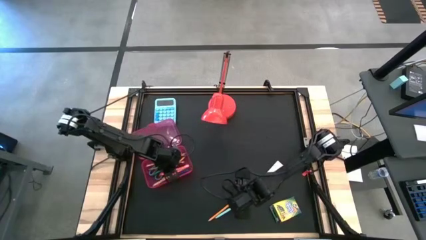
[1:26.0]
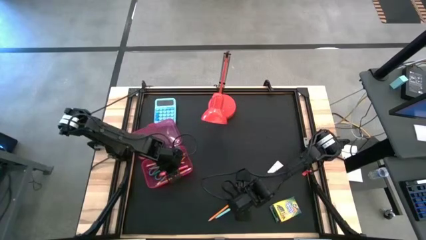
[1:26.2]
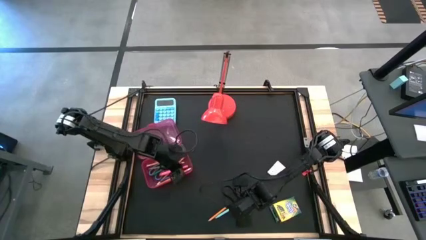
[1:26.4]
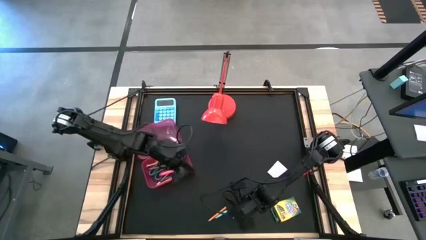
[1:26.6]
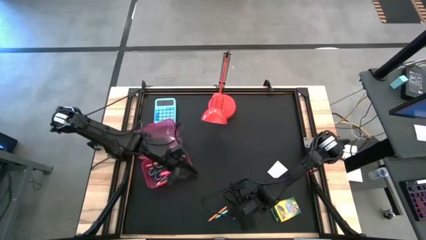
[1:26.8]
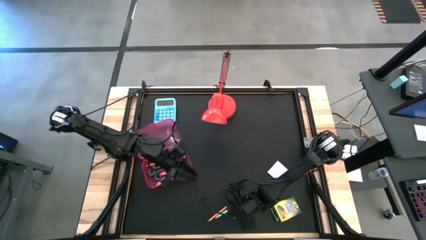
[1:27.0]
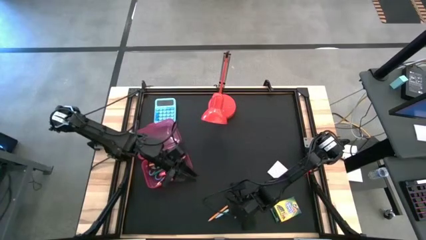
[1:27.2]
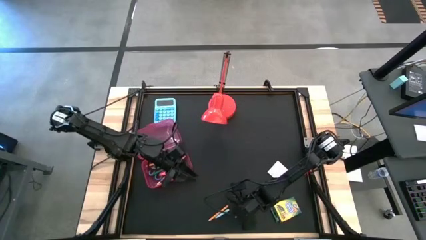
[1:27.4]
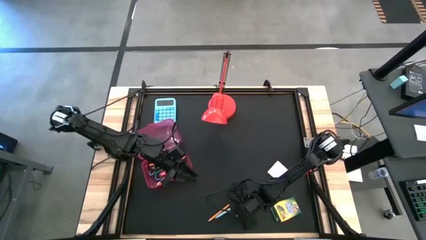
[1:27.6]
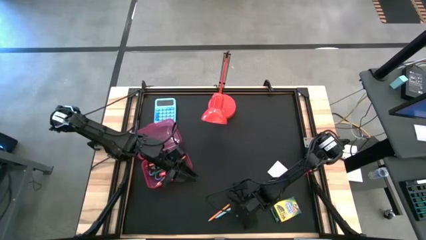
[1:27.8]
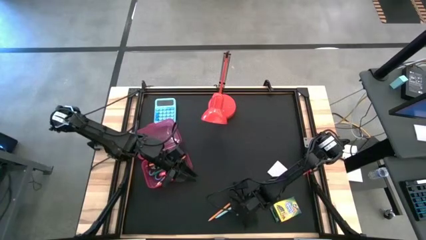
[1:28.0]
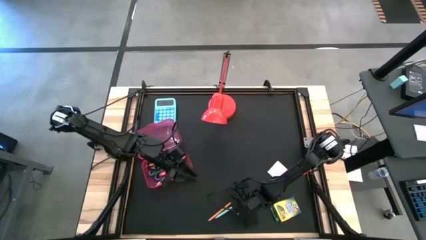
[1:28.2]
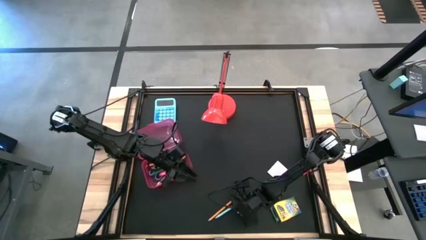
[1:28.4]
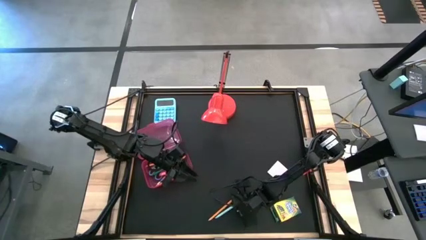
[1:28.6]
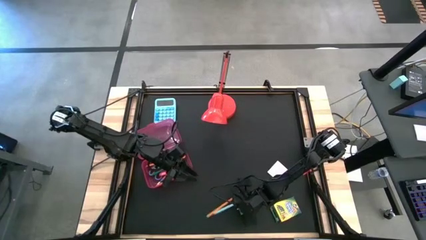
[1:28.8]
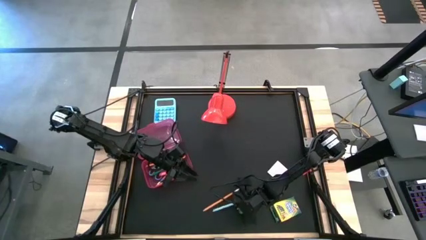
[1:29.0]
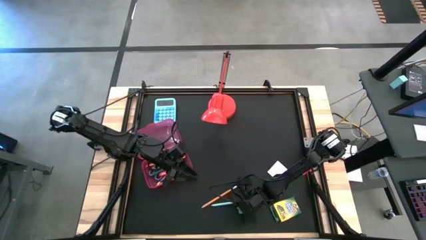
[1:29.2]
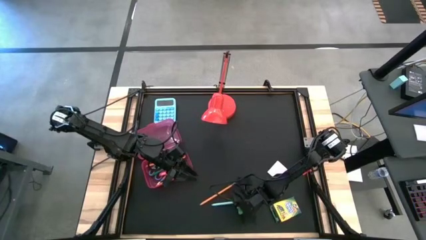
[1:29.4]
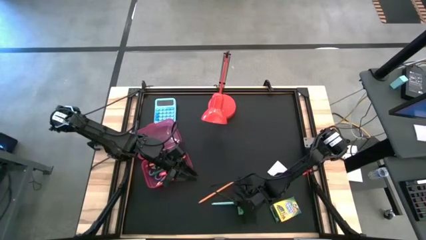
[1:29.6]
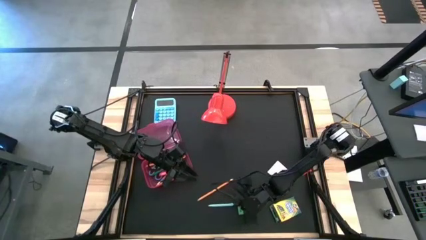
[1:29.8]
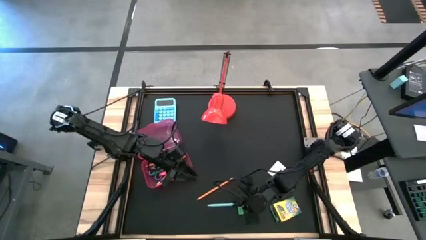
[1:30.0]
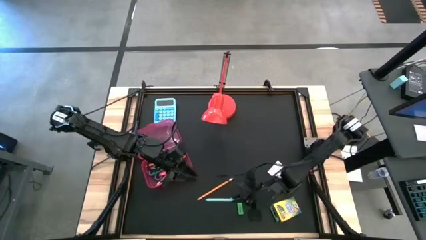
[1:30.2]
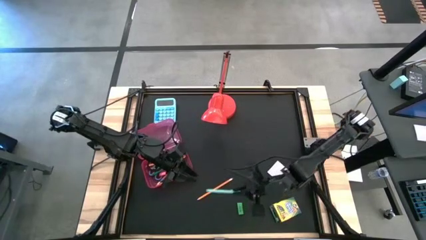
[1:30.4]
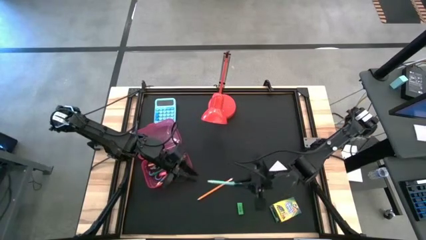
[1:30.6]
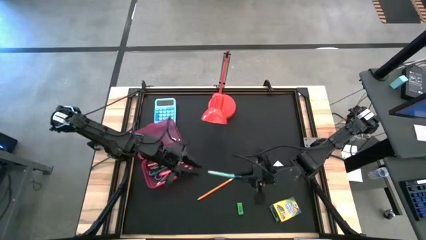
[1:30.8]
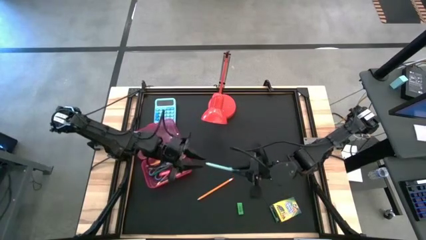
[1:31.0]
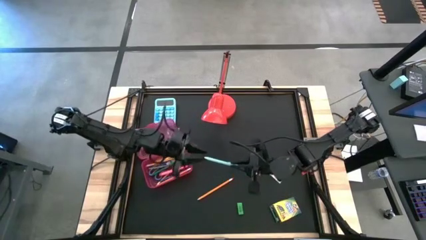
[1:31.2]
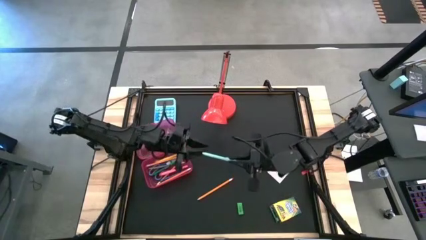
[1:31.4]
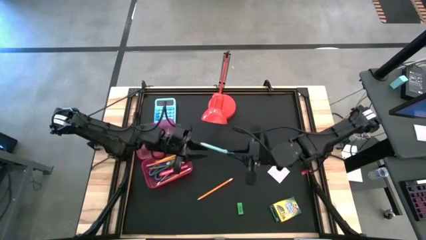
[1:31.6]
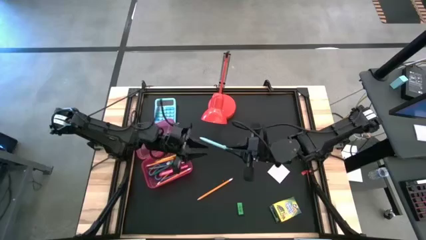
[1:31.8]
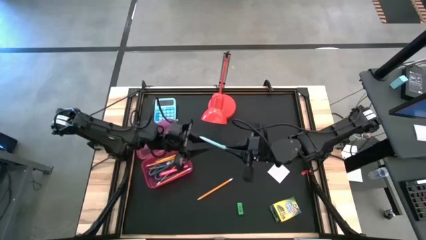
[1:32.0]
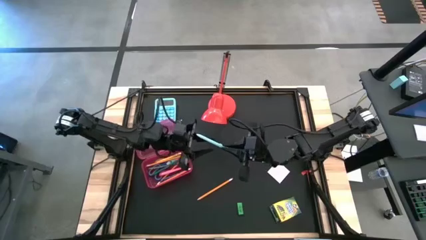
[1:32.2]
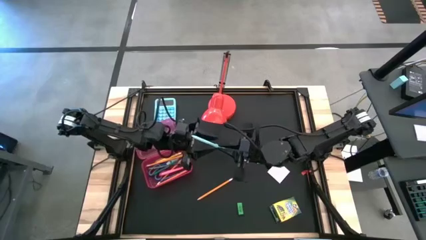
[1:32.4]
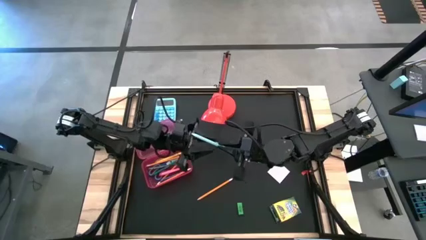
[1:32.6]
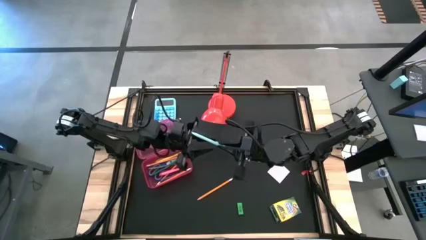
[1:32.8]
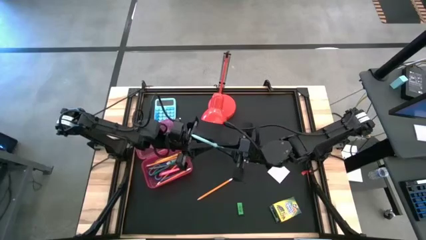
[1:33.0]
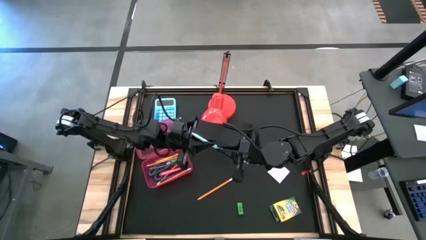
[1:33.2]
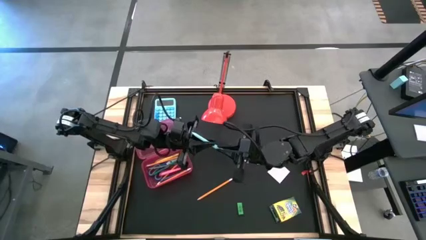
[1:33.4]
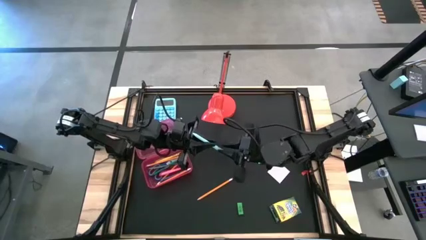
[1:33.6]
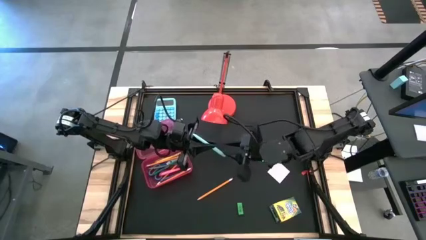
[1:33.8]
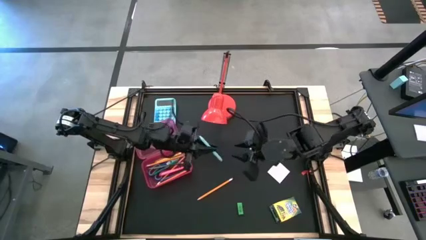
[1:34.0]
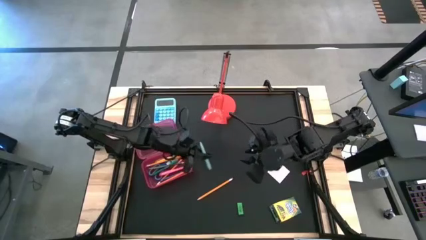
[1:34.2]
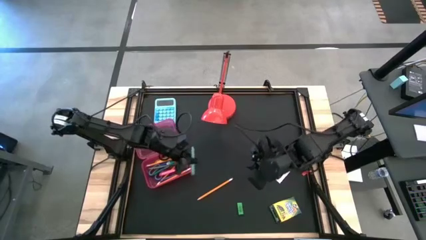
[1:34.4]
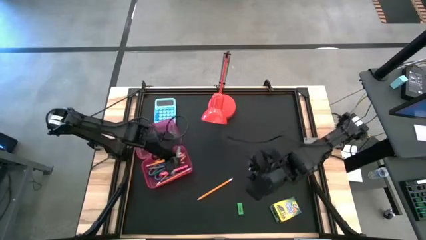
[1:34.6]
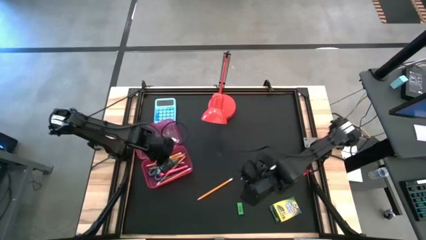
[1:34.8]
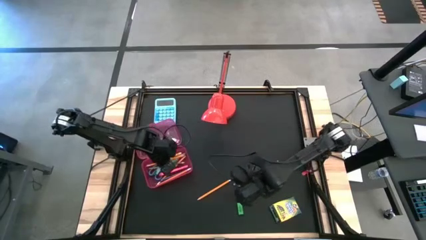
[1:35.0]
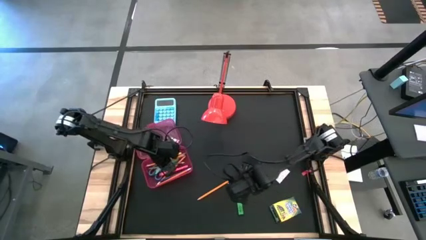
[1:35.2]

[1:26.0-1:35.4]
Task: Pack school essentials
Put the light blue pen into the red supply box

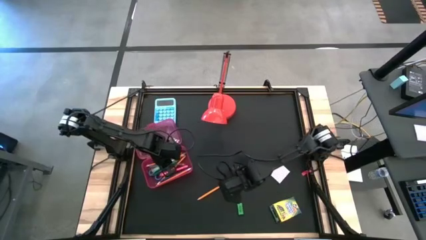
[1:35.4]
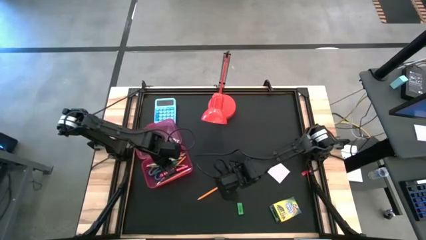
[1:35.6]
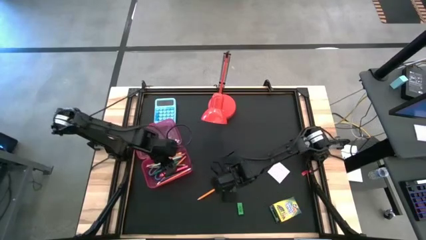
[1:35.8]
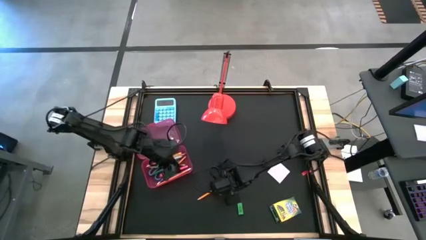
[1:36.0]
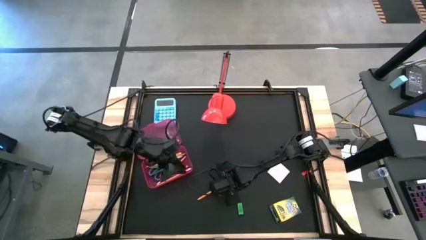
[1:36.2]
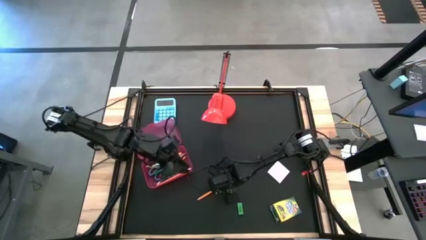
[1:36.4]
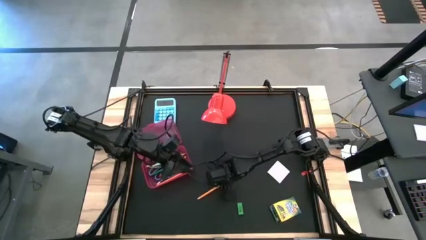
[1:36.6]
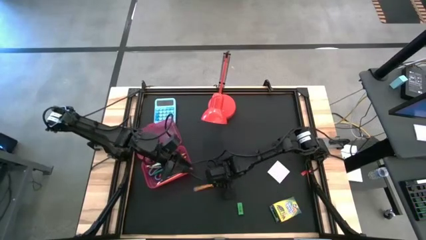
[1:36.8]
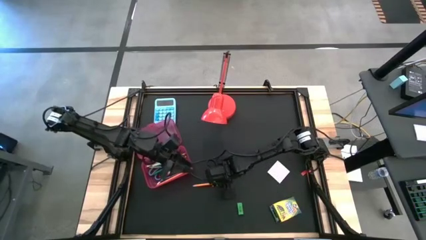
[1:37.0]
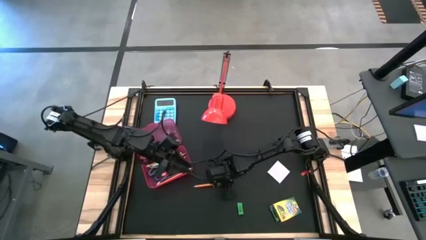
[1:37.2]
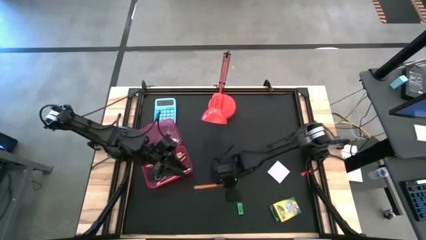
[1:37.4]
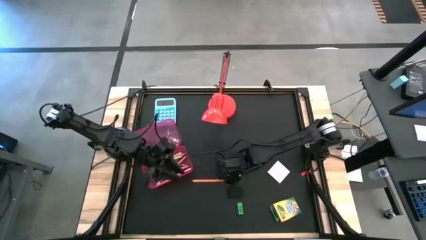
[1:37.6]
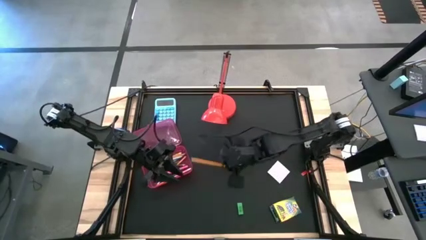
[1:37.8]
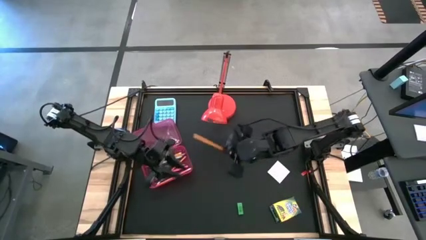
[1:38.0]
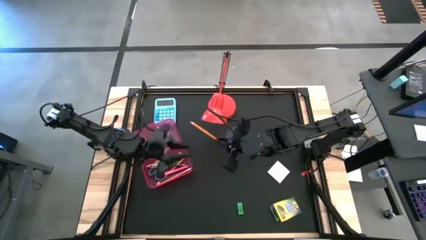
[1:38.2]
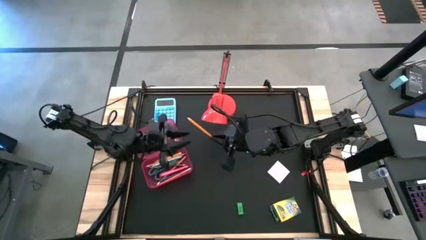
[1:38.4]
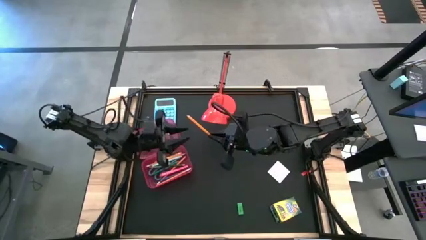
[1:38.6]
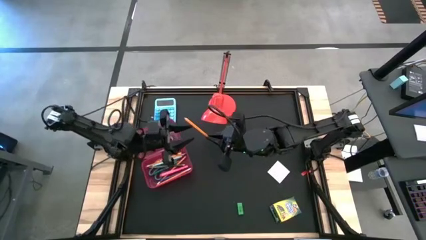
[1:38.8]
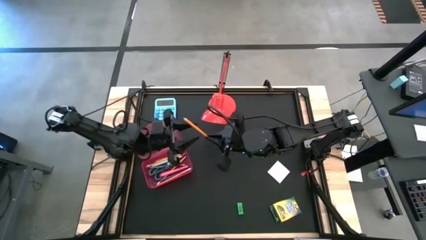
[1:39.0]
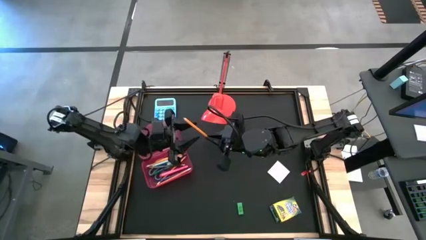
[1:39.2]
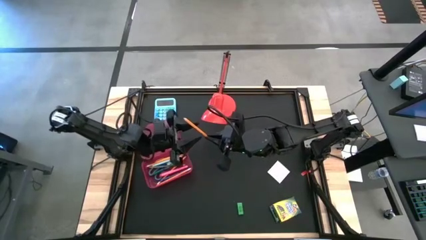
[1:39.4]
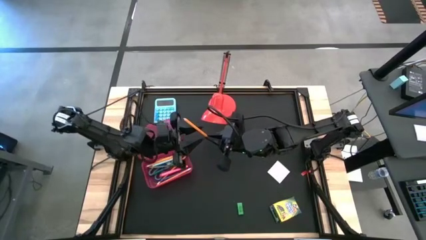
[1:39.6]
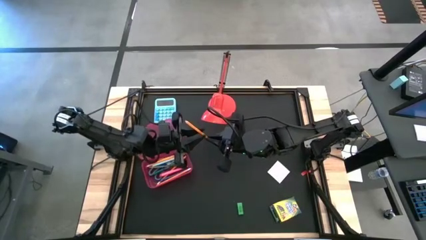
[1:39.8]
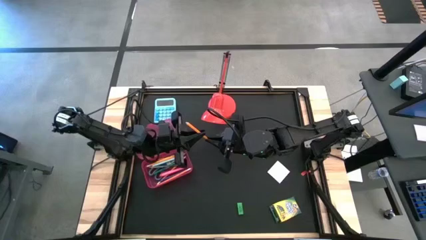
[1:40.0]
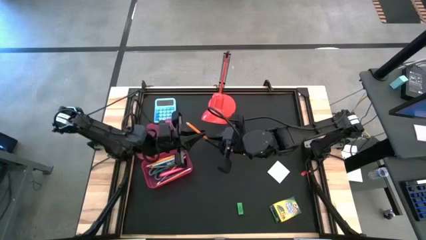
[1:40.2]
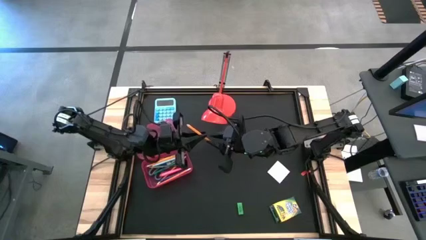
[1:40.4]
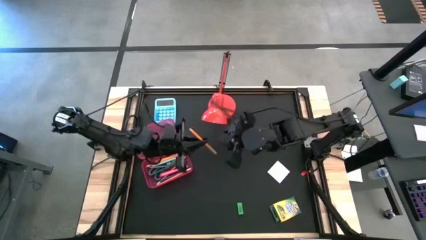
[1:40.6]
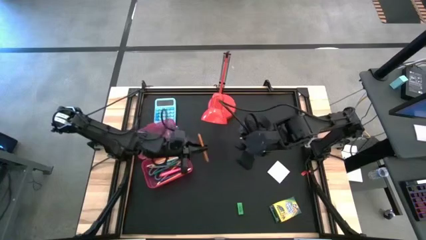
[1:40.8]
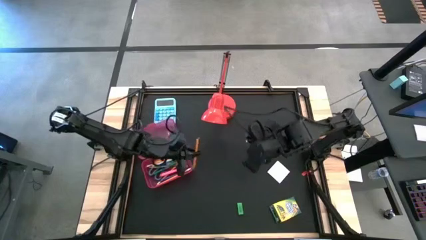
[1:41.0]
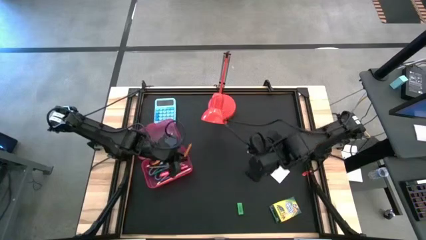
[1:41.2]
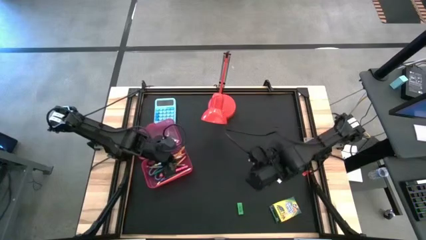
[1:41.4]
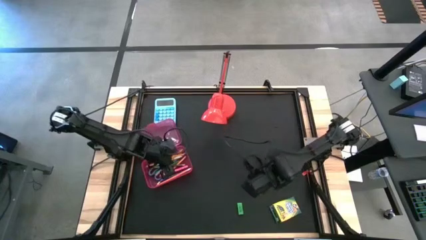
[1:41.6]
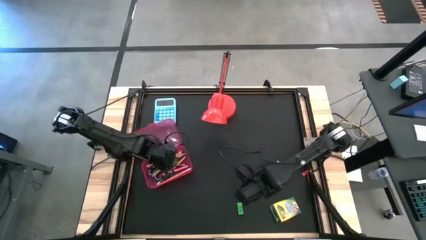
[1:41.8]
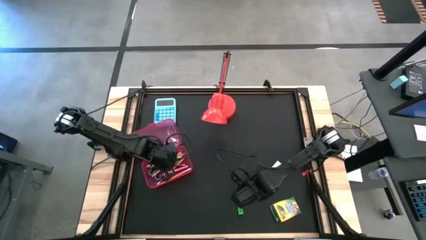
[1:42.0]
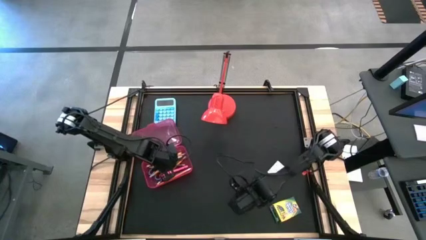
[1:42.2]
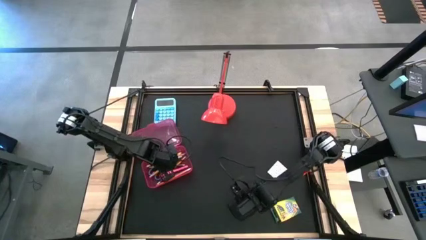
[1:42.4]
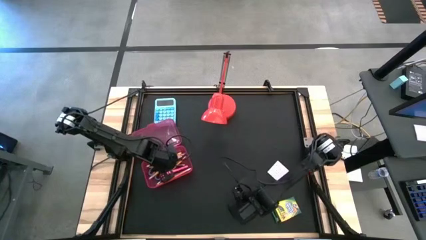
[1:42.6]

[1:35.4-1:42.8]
Put the orange pencil into the red supply box
